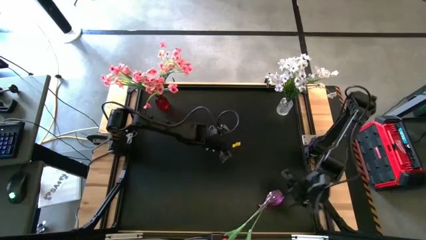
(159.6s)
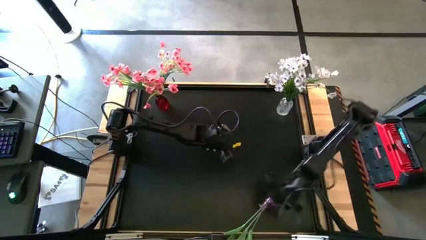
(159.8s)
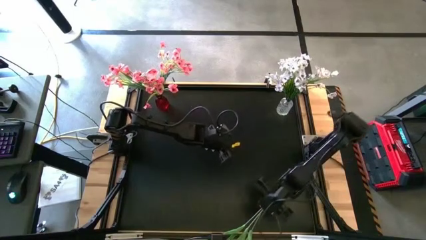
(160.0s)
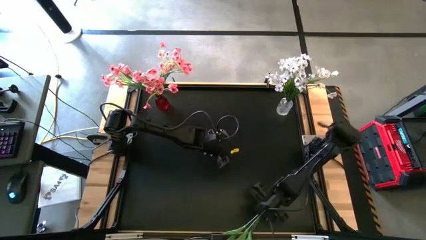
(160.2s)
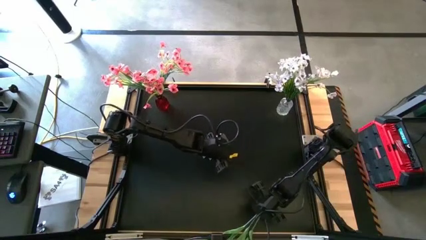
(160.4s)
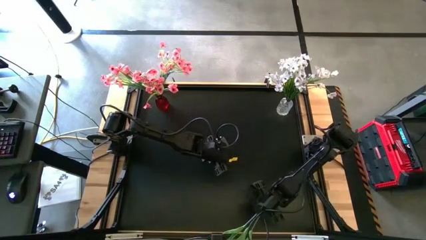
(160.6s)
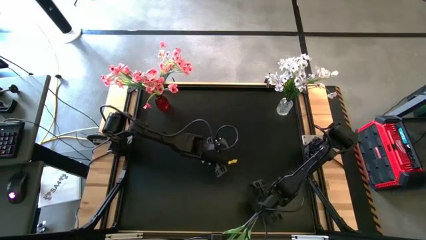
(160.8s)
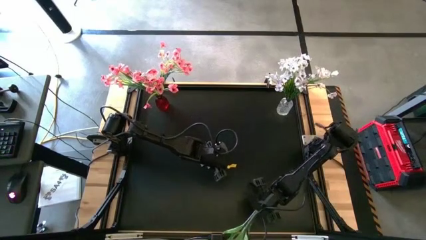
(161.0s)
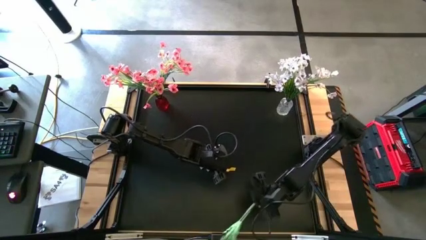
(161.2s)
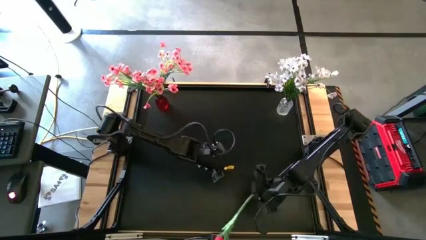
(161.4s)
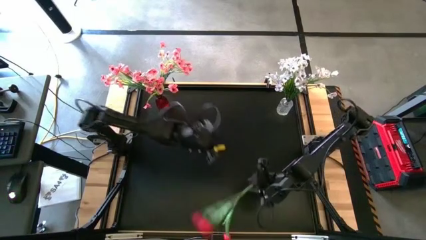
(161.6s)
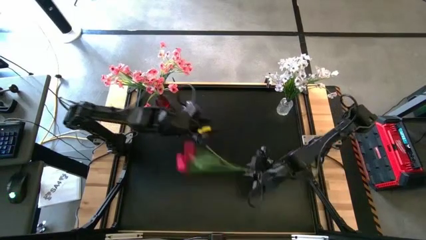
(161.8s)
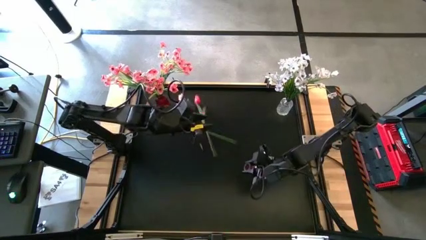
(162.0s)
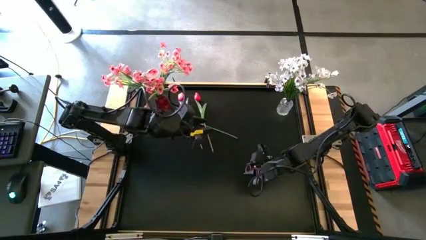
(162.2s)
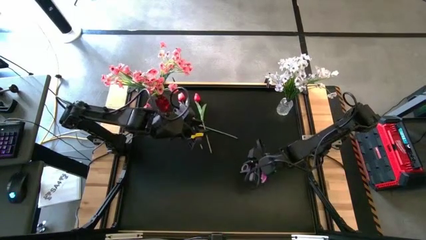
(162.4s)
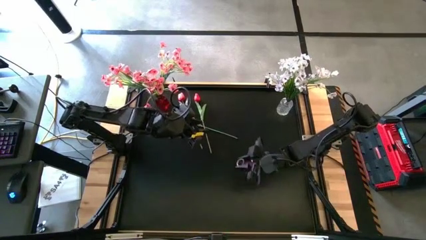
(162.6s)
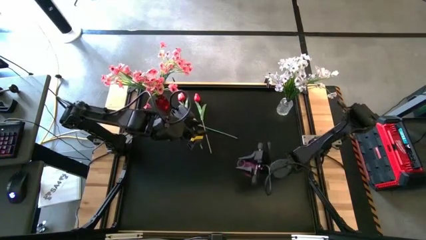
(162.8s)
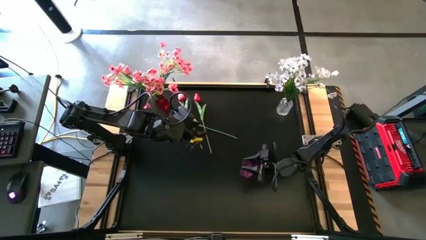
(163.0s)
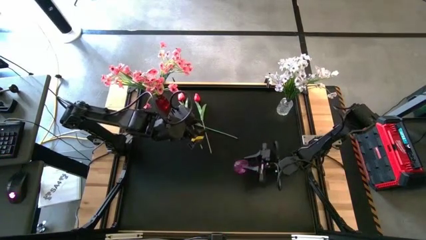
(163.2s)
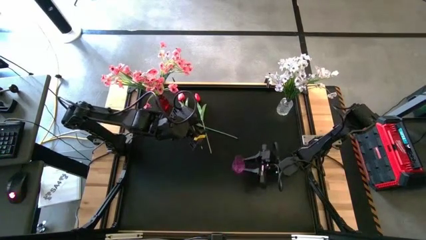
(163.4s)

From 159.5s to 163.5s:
Task: Sort flowers into vase by color
Adjust the purple flower vase

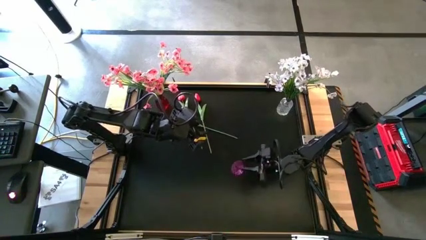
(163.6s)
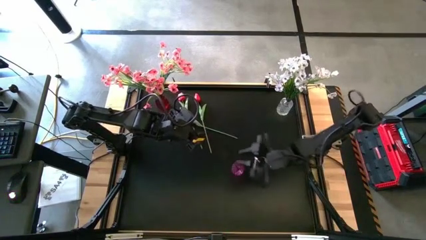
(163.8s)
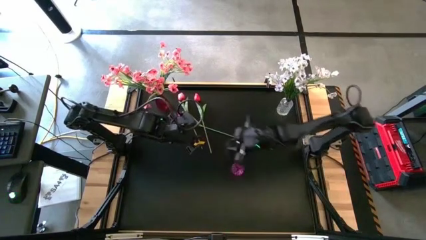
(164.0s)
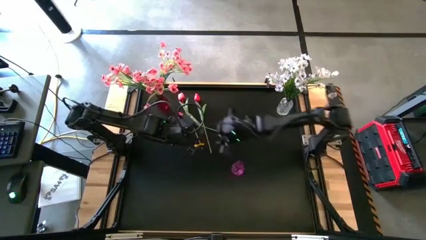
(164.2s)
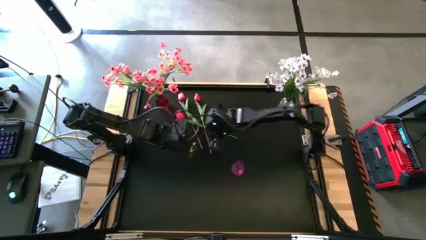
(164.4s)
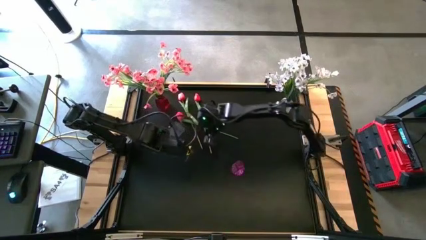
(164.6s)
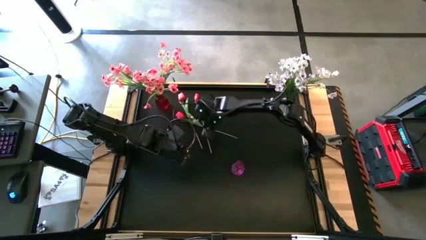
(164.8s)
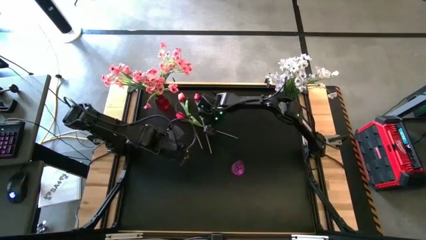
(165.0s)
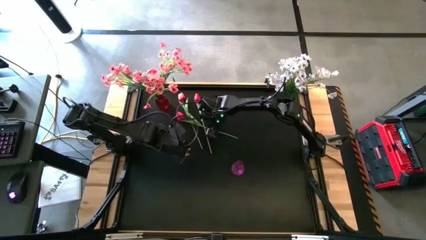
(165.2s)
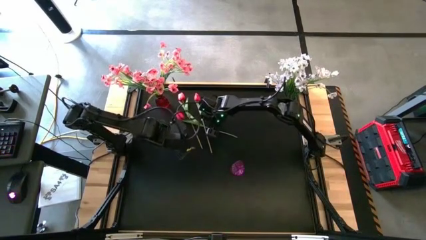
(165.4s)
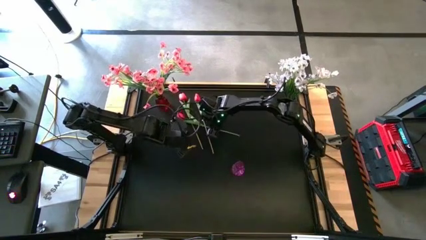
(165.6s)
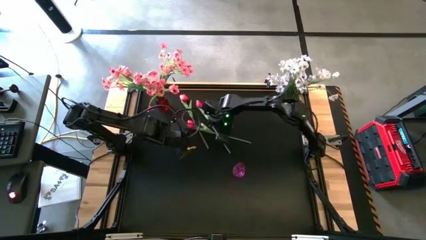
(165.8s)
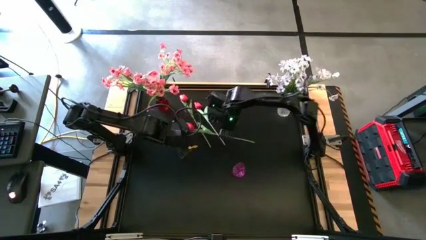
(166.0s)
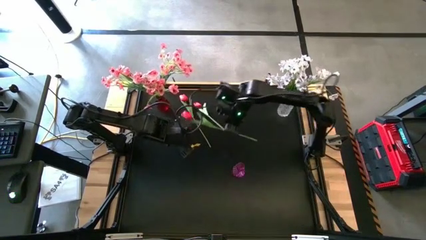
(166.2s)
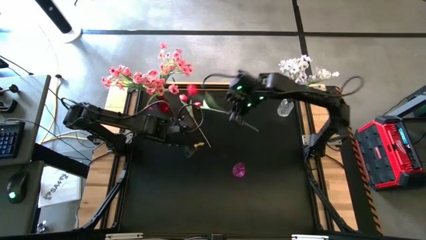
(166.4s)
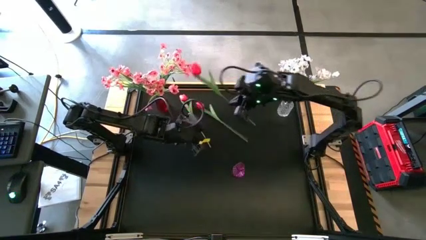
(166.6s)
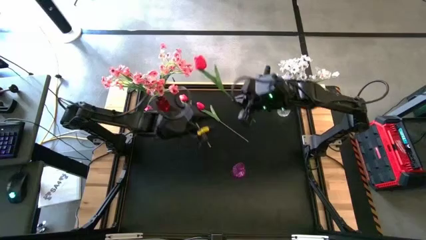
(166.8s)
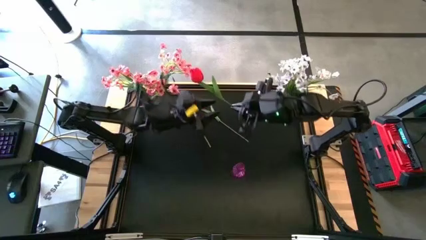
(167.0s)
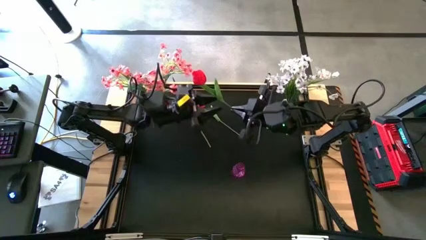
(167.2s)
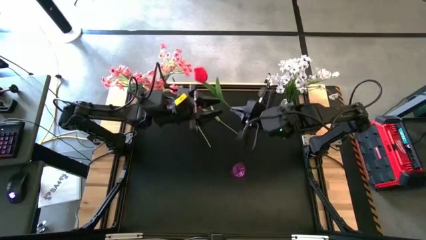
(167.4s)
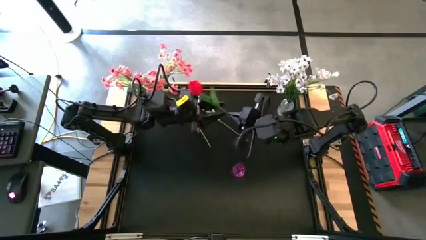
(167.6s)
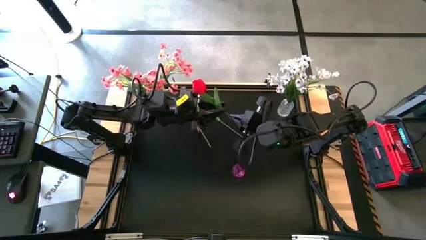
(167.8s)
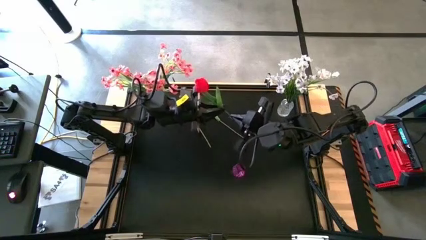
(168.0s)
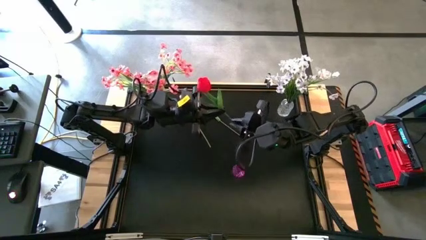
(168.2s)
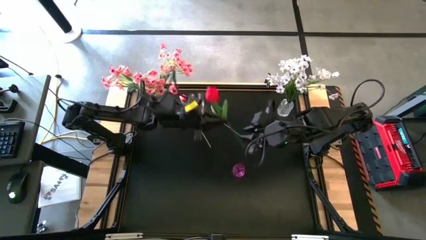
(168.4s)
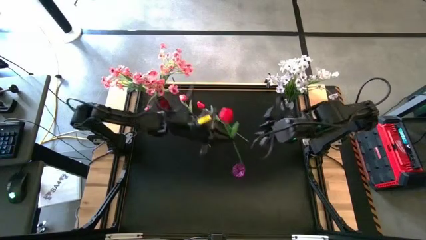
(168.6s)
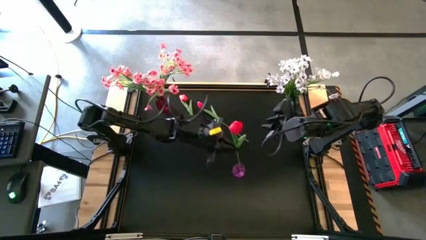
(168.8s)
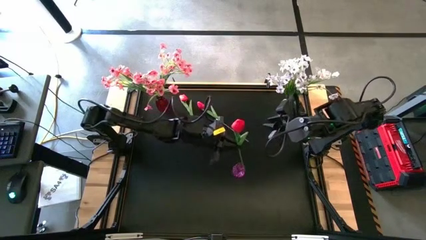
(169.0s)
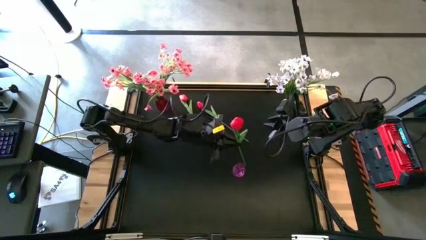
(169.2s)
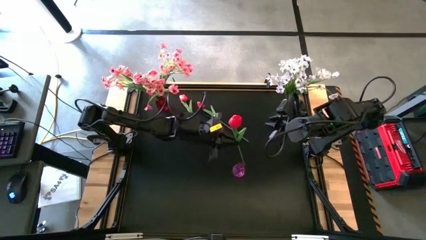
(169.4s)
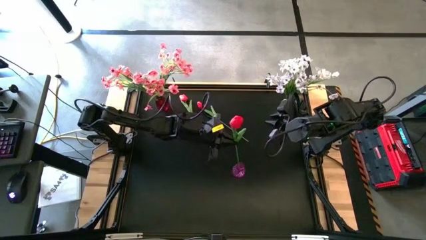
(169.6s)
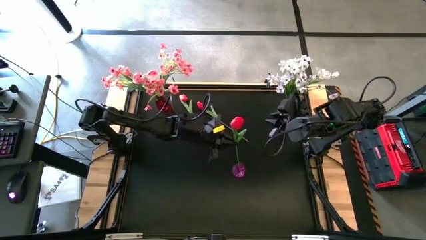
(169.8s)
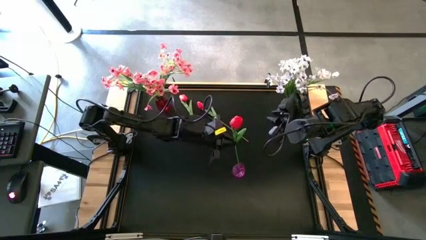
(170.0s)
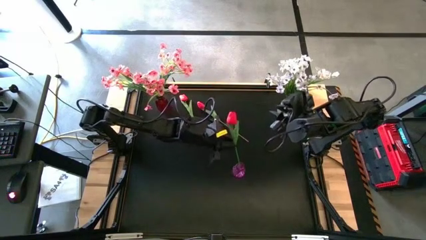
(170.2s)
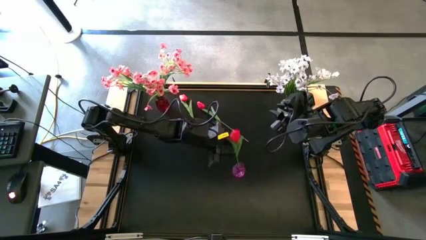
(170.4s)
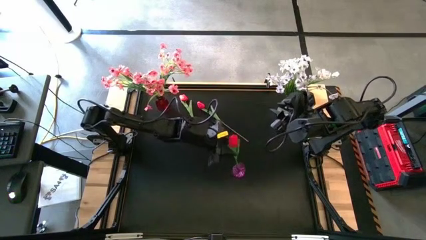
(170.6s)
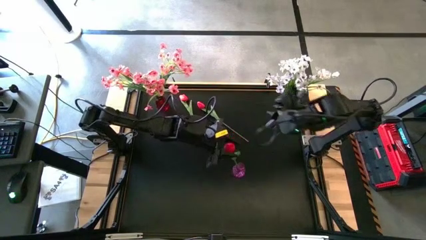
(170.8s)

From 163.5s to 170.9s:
Put the middle red tulip into the purple flower vase
